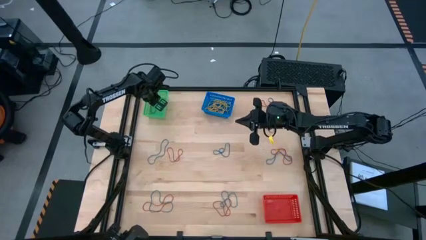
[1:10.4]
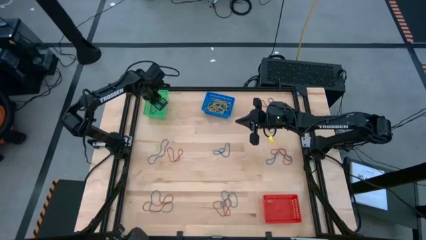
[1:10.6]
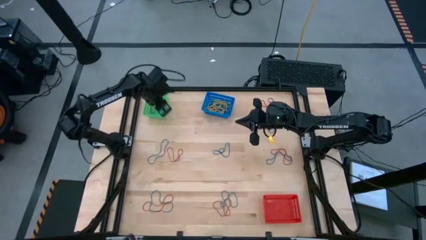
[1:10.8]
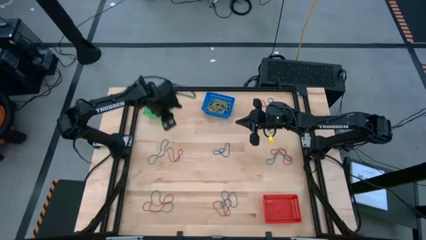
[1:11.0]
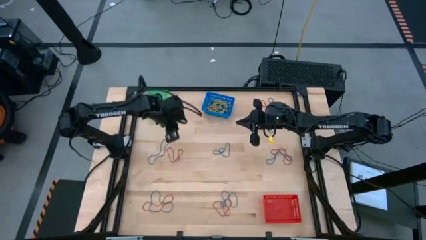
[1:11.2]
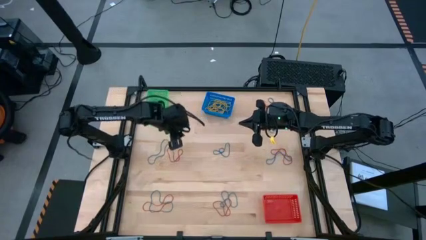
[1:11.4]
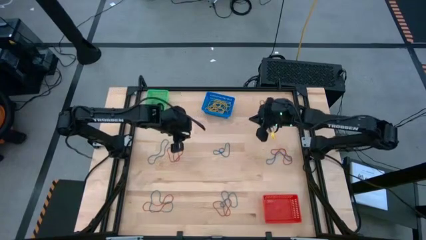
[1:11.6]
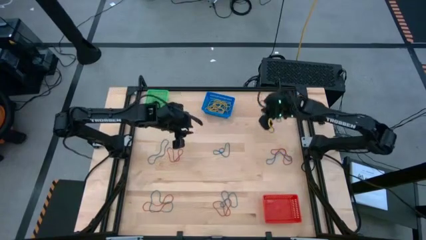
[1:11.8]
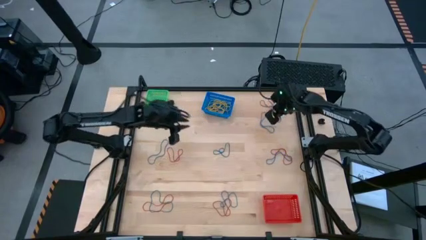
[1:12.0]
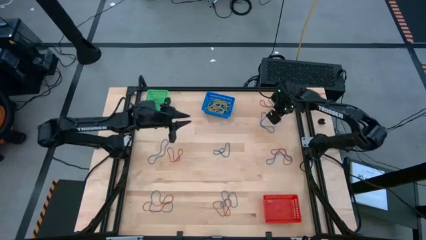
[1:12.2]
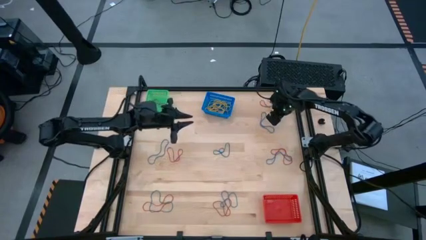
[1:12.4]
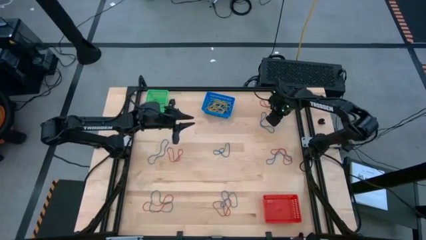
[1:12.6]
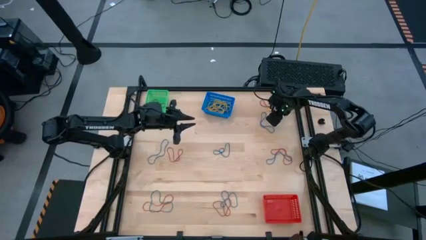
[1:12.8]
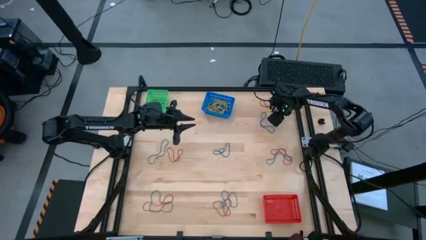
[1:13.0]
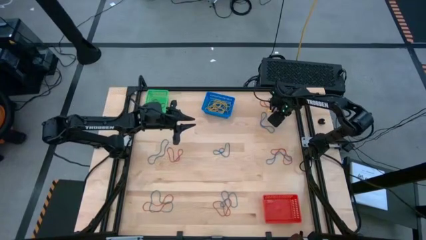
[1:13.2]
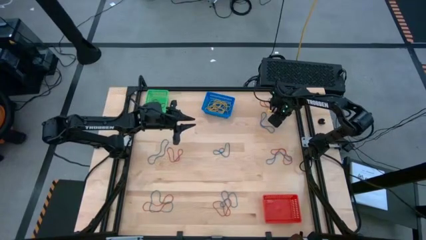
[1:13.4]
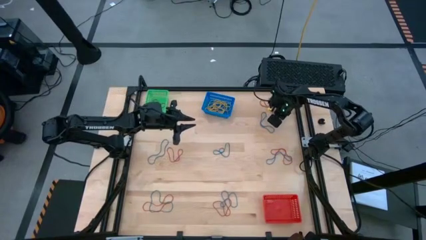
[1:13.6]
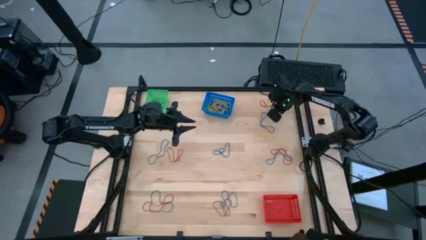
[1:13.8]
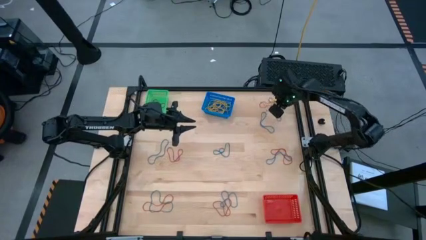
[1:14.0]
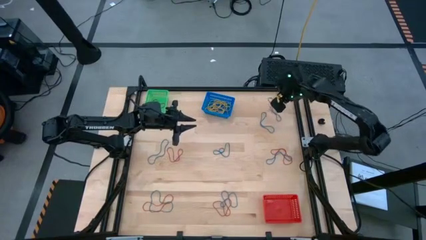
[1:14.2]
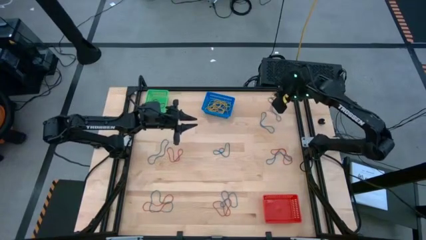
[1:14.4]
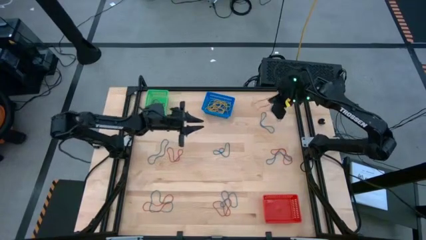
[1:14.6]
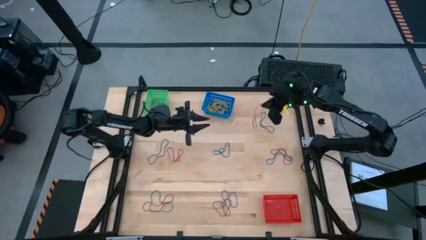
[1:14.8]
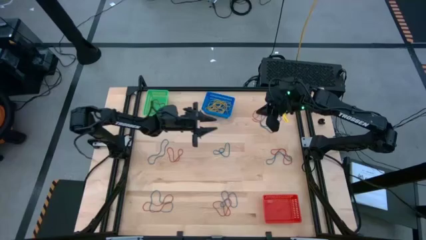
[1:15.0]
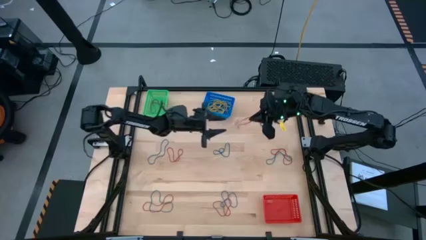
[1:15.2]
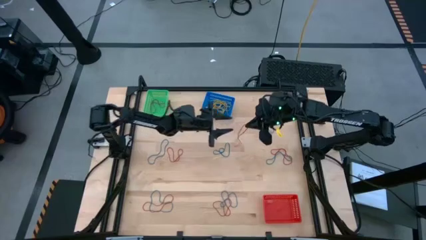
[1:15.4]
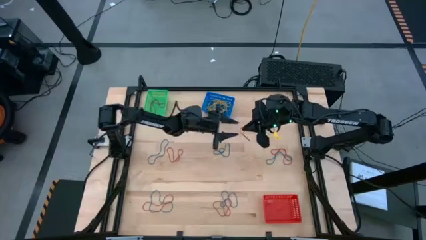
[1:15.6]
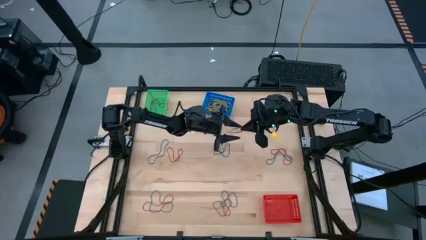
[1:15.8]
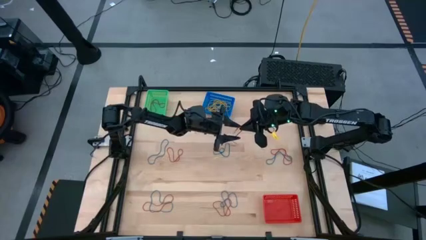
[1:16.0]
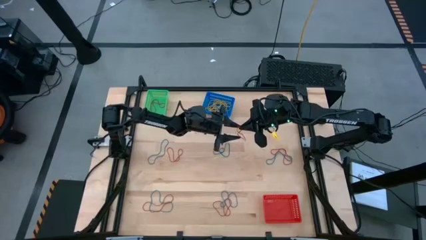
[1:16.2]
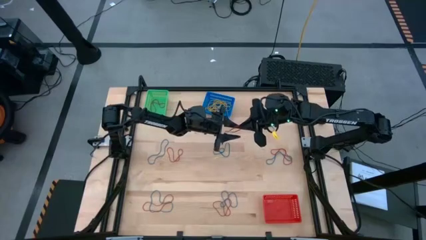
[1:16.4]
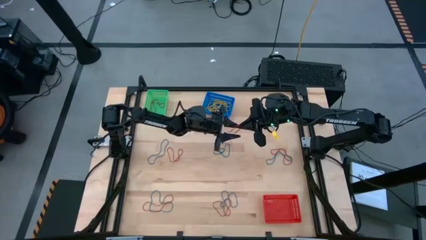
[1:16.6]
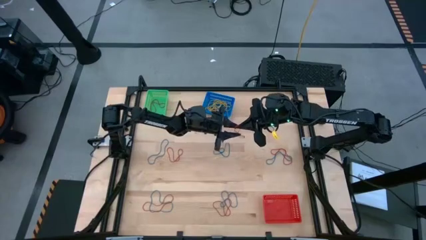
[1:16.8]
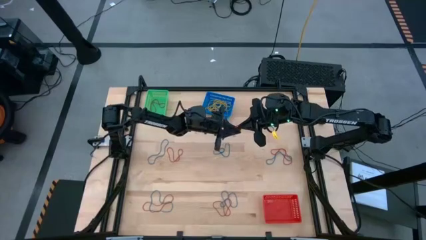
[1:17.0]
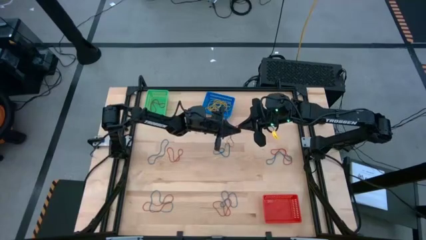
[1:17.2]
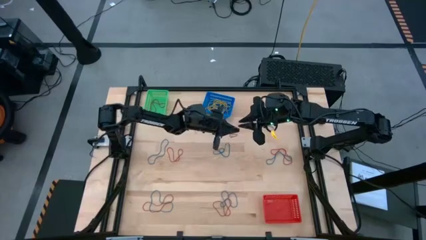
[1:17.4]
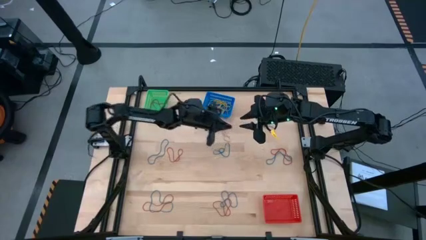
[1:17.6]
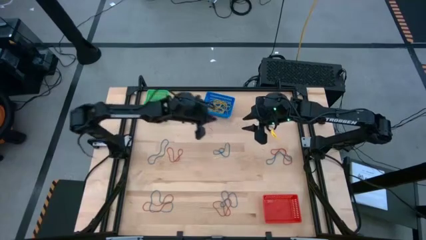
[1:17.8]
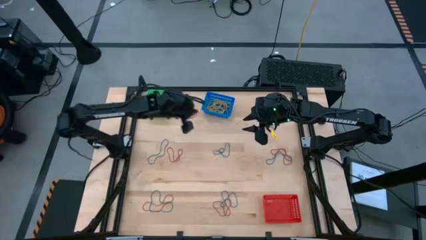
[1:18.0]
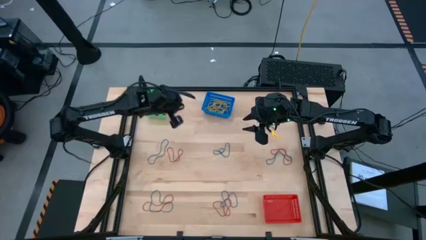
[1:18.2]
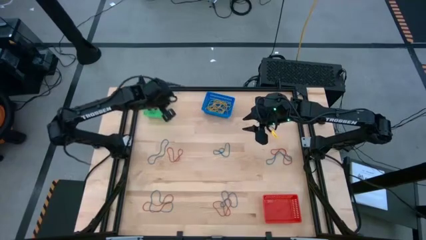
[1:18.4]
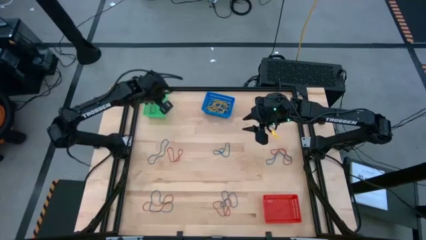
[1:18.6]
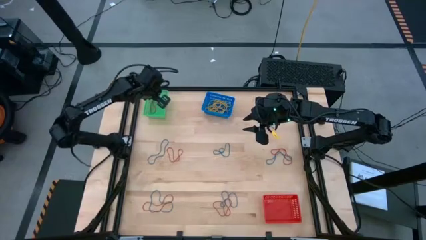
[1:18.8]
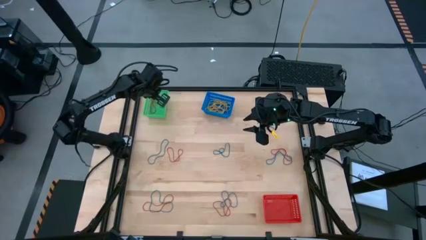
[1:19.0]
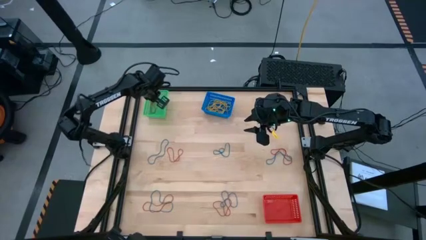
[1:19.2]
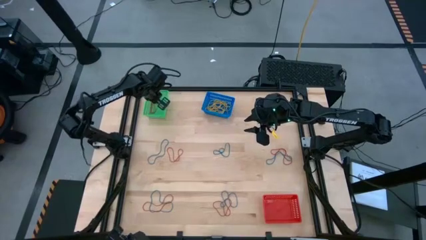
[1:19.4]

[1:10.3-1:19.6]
Task: Sort rubber bands into baskets
Put the red rubber band into the green bin

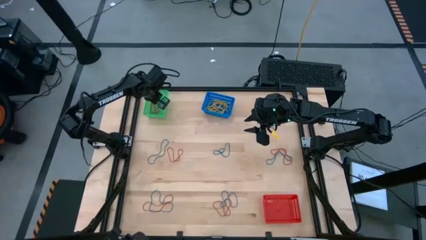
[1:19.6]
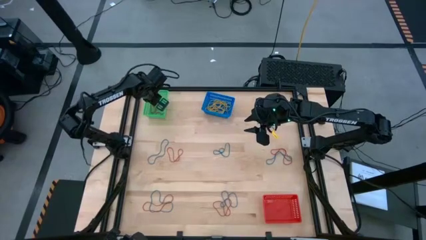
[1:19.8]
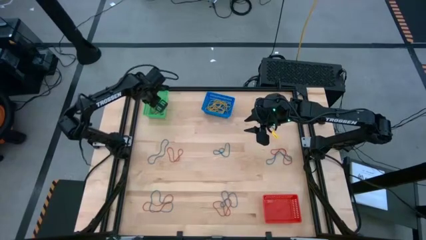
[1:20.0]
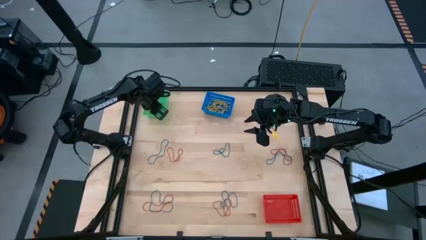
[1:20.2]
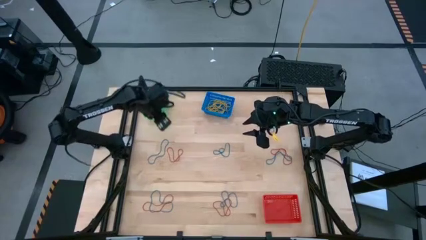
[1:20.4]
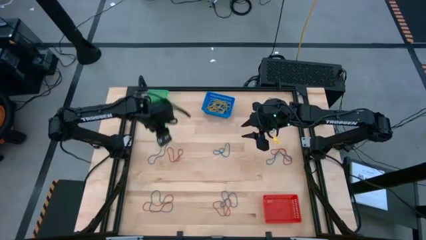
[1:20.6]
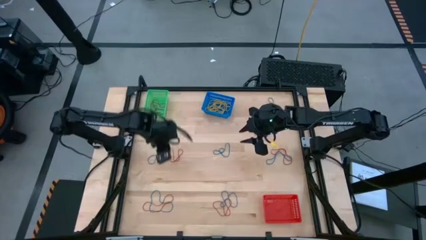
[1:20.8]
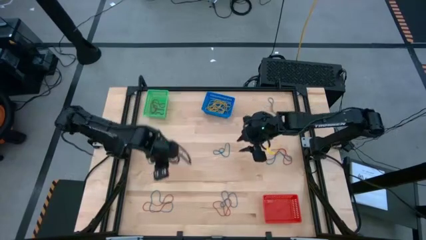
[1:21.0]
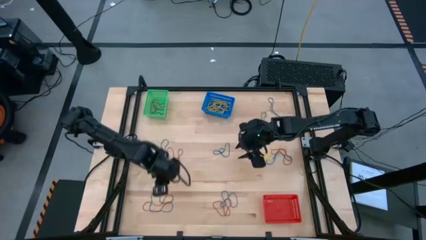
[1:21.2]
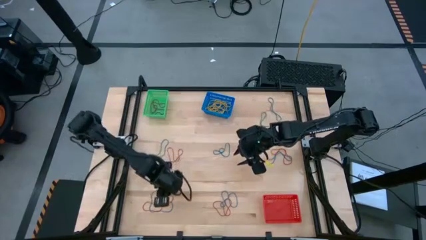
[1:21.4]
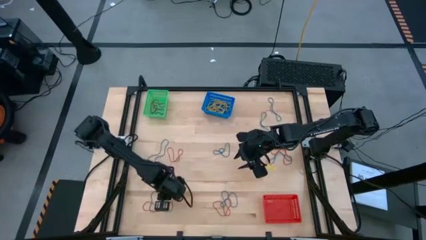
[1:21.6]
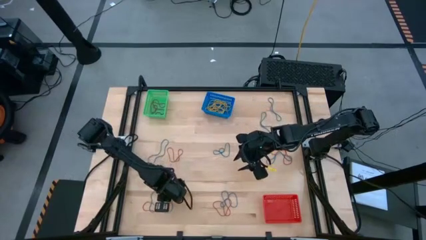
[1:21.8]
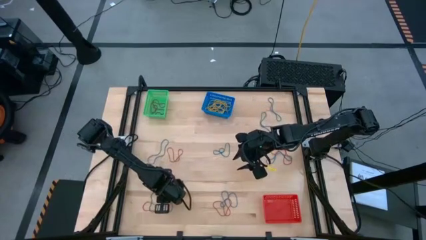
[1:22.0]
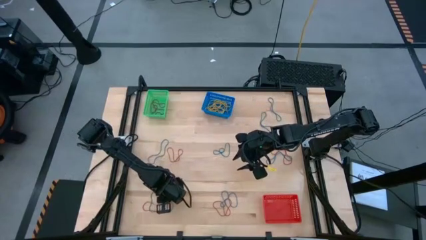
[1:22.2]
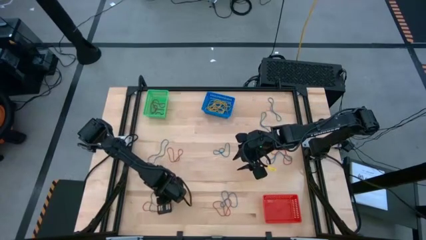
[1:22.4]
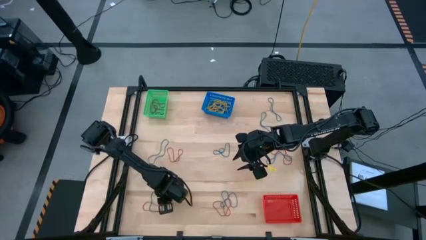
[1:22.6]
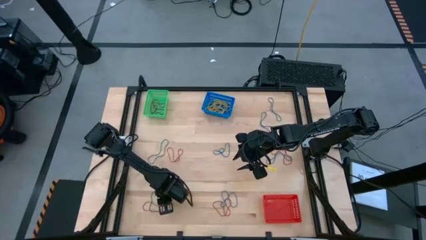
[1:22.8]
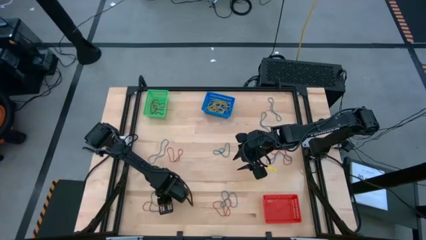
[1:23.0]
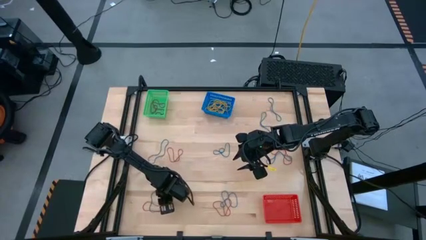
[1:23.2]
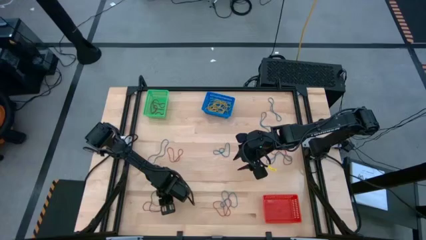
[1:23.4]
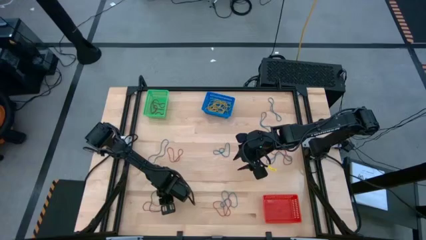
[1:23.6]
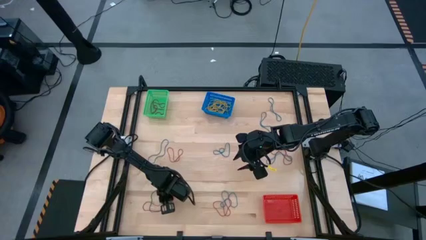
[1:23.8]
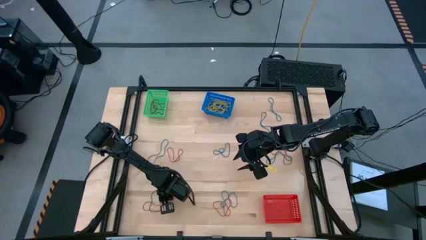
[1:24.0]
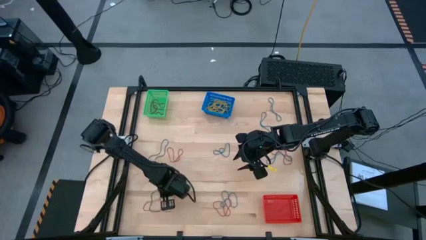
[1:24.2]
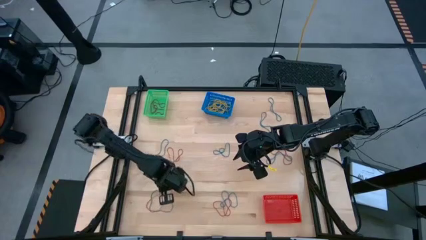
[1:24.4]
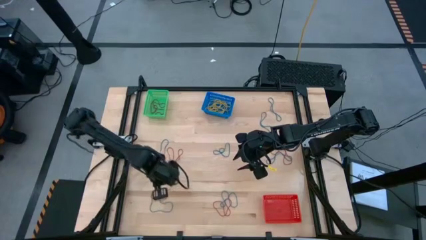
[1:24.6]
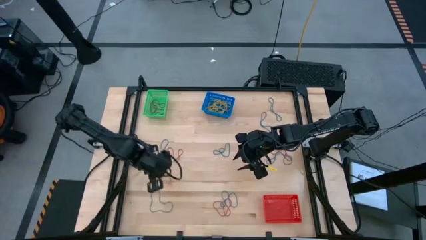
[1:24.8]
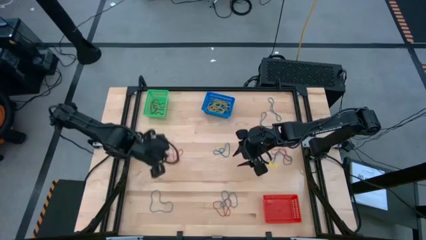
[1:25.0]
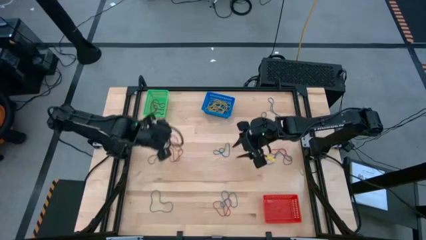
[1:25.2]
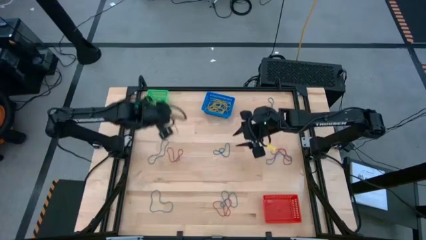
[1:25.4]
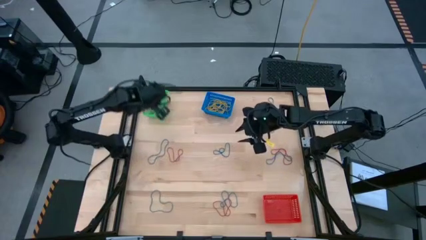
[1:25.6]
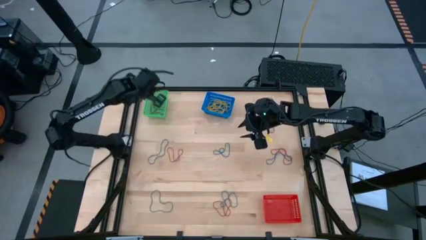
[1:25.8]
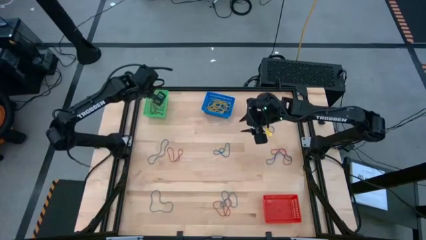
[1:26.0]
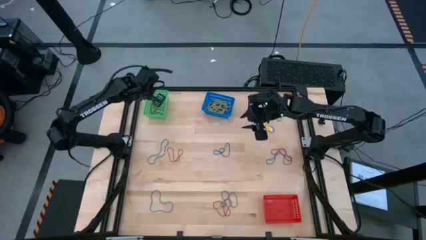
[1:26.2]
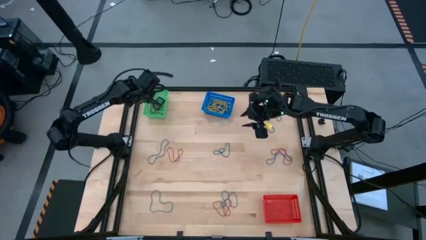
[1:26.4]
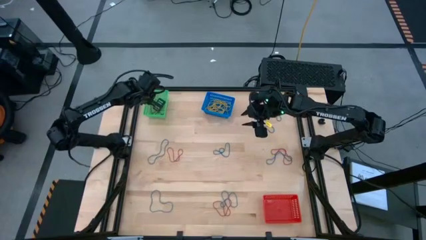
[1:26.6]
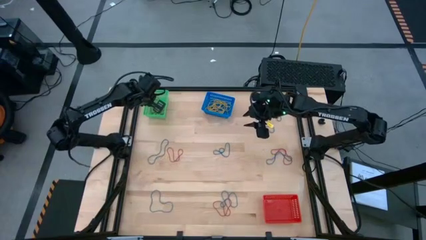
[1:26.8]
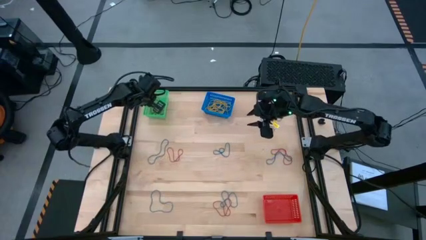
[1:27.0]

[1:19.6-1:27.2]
Put the red rubber band into the green bin
